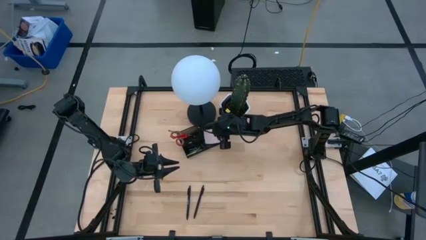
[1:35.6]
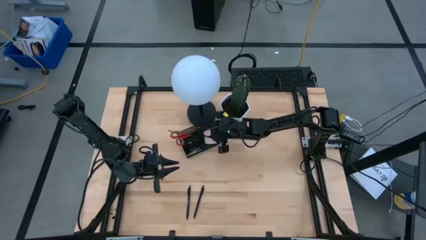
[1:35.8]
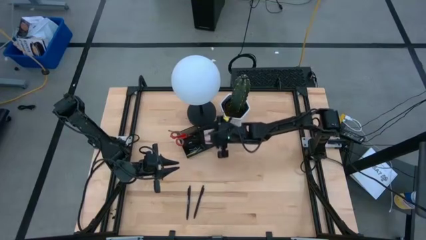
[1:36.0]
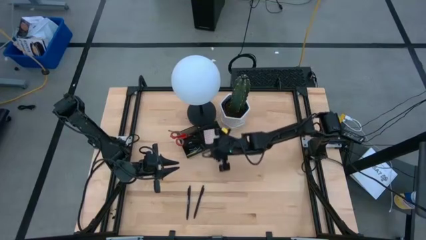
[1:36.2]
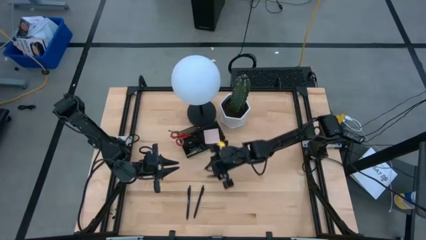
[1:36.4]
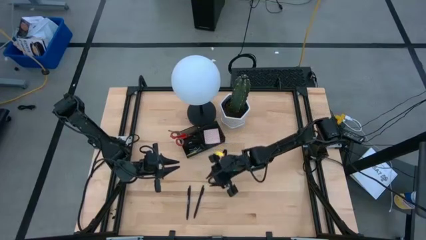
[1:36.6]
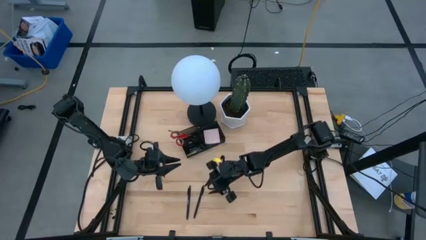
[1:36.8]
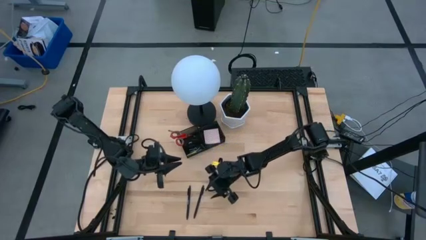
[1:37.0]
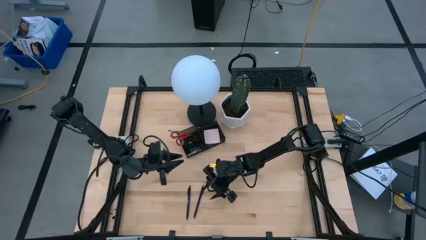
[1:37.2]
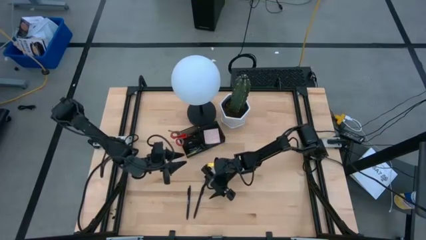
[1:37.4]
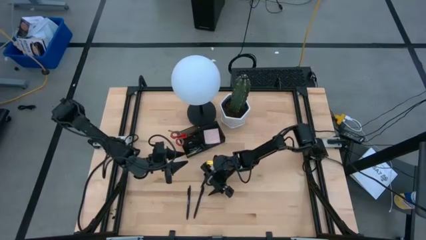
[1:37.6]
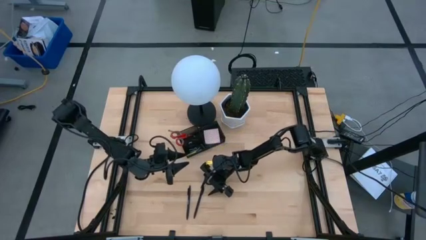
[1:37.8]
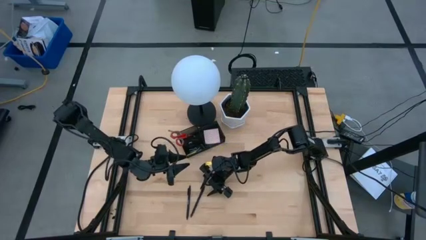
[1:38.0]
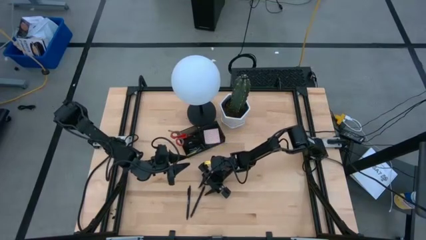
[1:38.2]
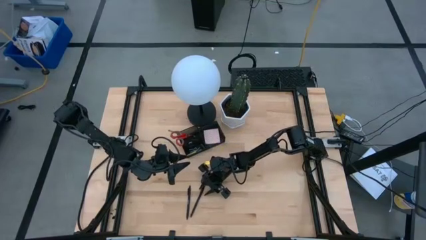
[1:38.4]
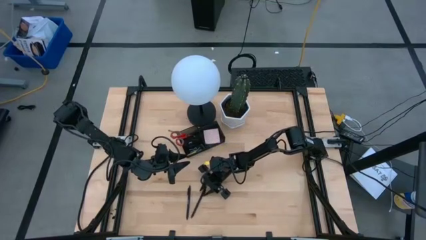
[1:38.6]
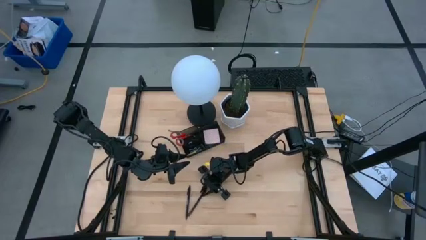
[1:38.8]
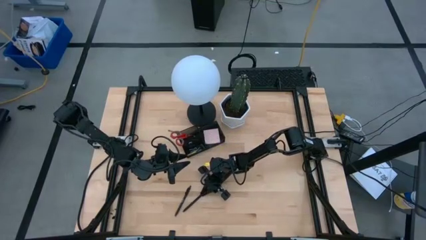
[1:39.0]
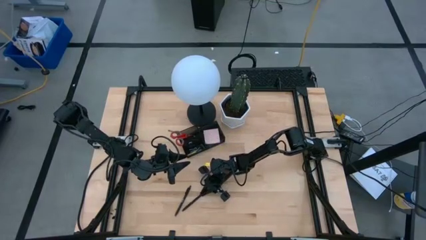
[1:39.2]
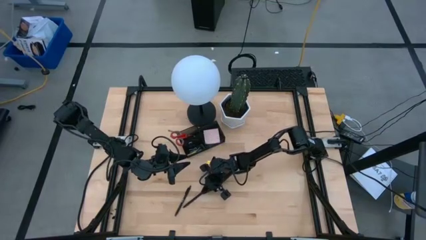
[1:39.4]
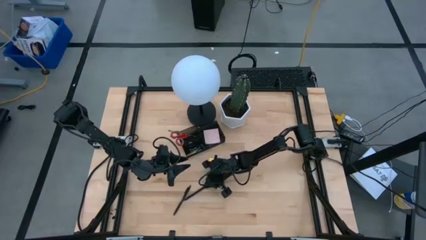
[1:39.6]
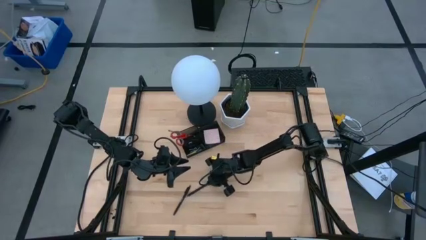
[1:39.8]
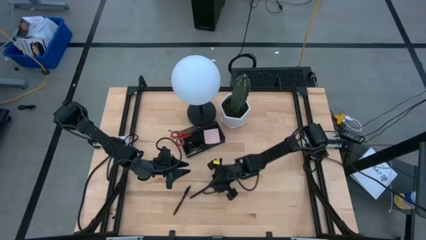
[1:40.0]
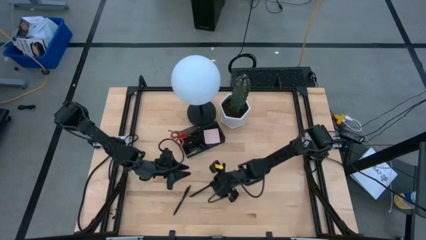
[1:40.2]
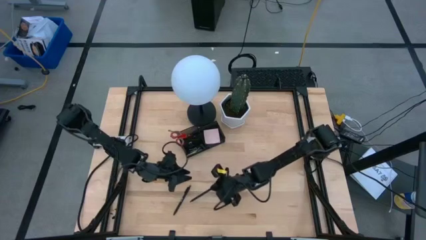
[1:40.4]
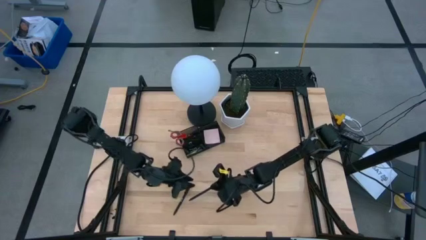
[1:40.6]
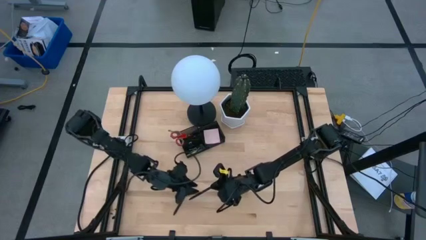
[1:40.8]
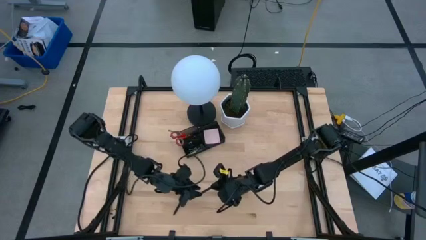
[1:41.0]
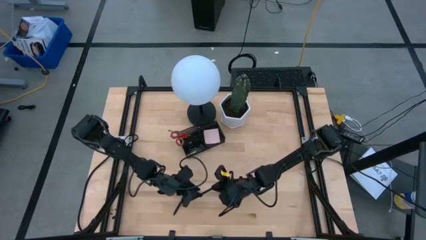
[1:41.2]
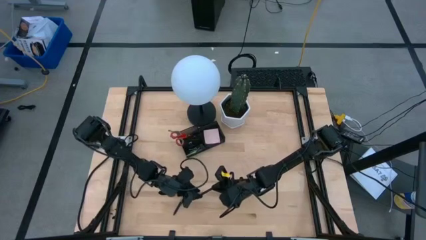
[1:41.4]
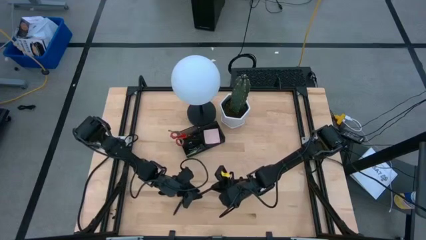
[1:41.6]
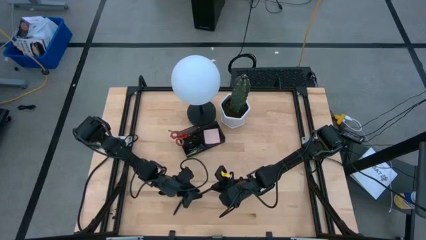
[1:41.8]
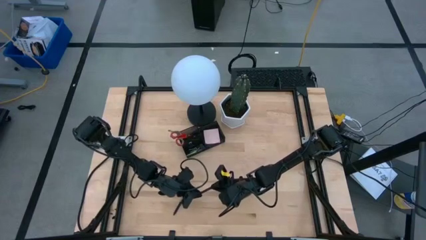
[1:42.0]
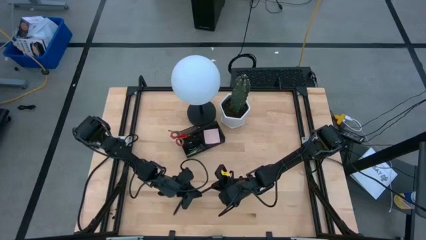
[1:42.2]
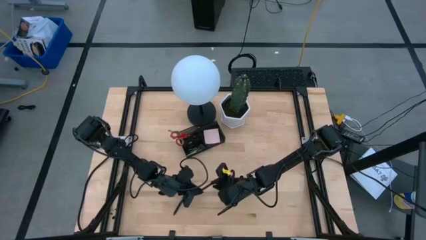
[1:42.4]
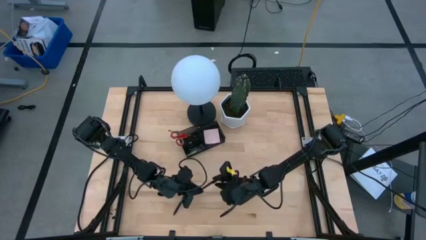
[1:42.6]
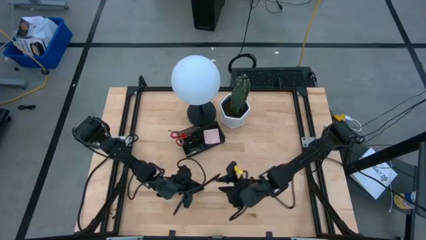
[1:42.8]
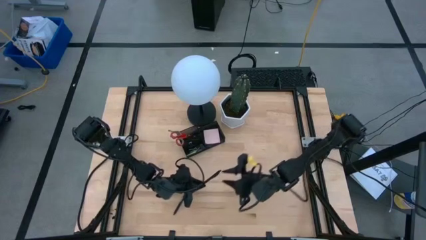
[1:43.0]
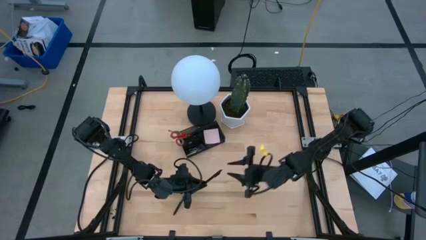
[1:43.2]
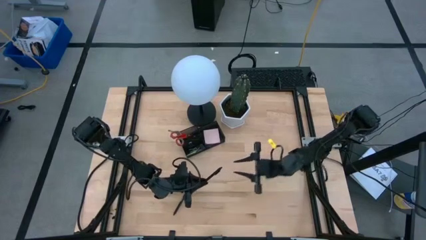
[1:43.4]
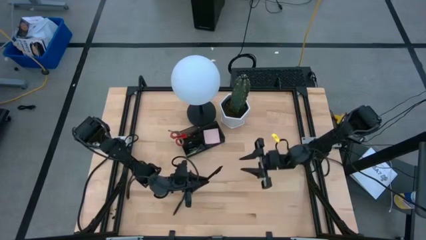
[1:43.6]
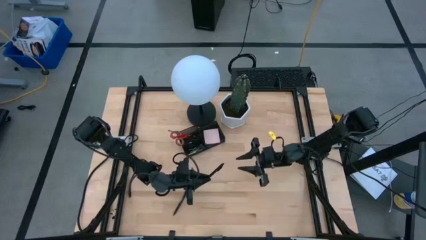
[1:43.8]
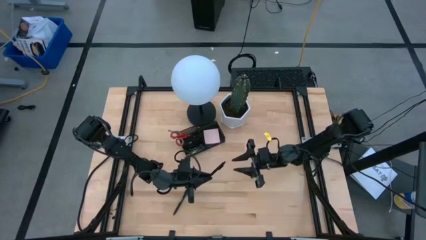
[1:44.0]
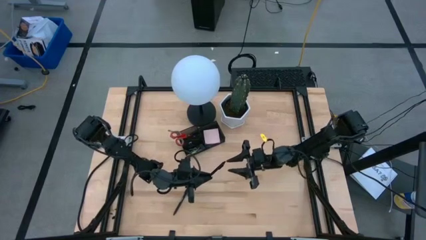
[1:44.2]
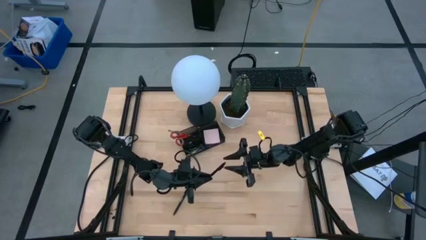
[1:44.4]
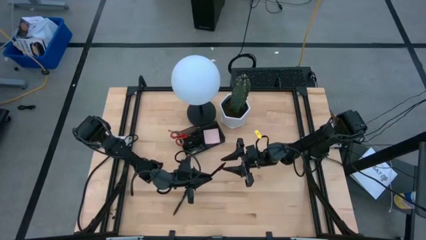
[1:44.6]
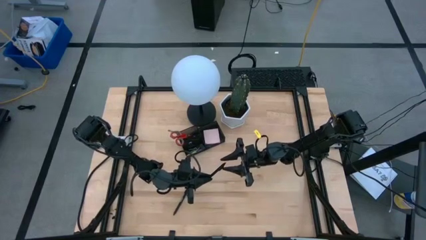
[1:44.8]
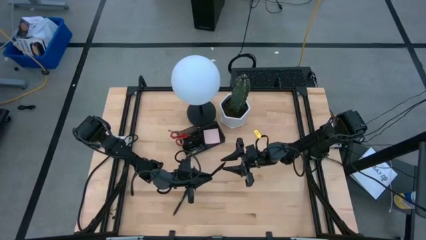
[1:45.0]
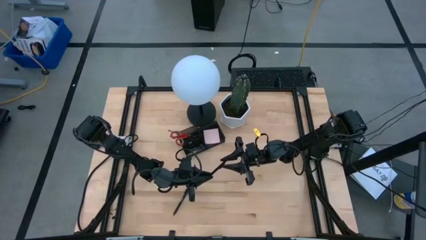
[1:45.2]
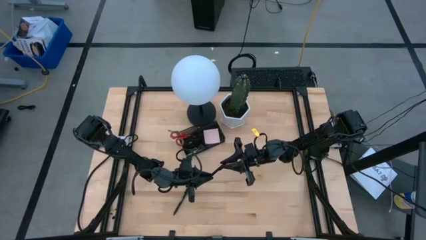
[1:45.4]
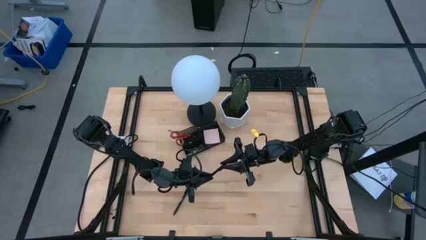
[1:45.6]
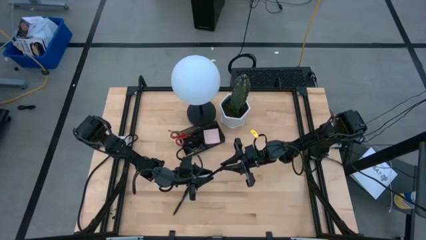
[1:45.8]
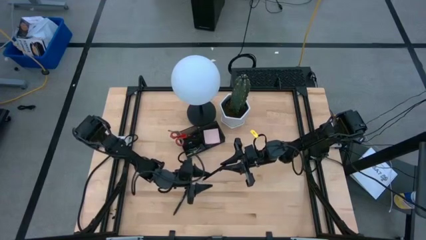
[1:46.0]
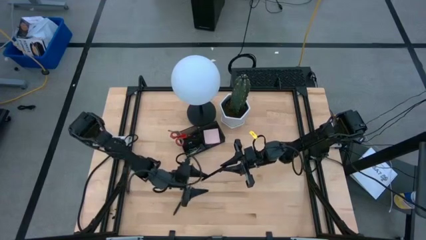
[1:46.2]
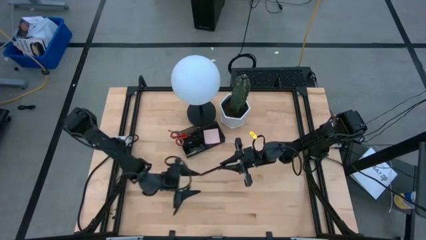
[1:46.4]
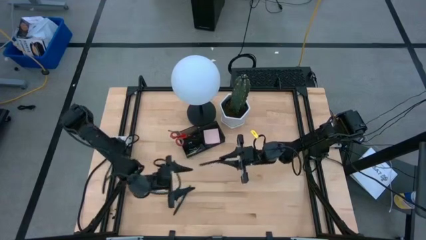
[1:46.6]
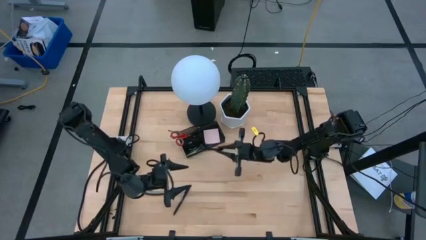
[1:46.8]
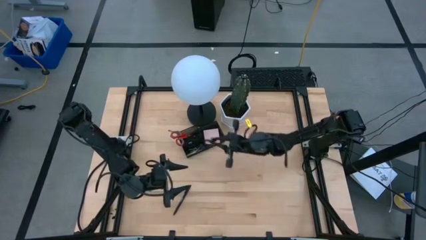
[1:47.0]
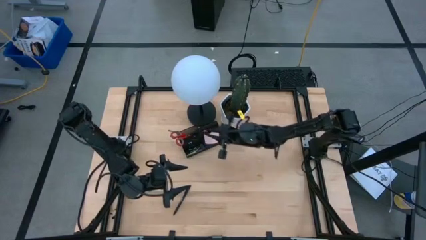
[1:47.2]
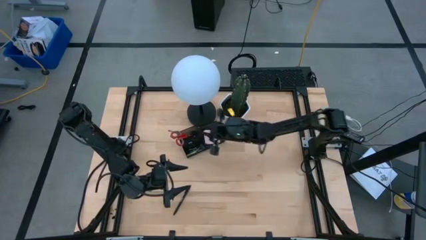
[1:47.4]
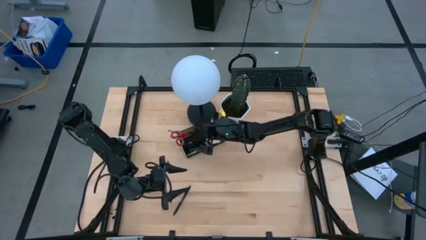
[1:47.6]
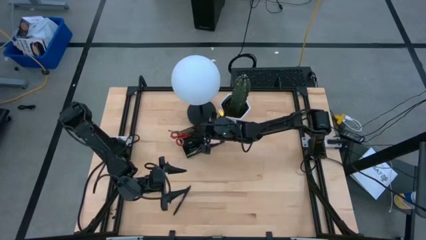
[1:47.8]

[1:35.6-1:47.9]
Task: Pick and place office supplies into organizer
Put the right black pen into the desk organizer

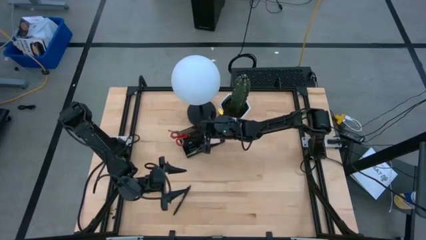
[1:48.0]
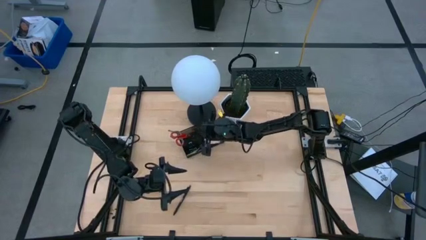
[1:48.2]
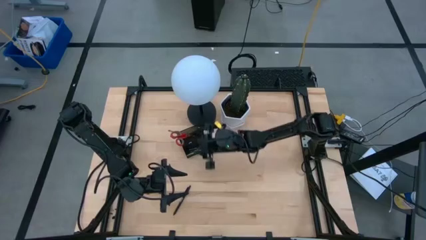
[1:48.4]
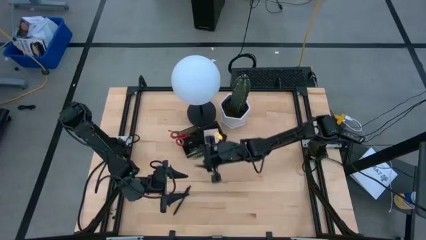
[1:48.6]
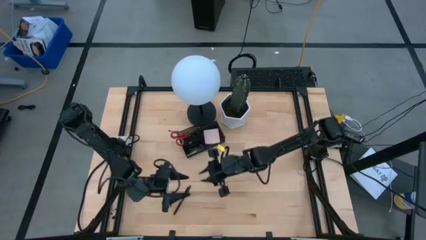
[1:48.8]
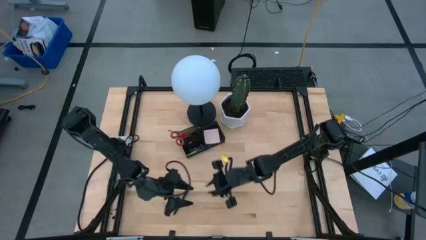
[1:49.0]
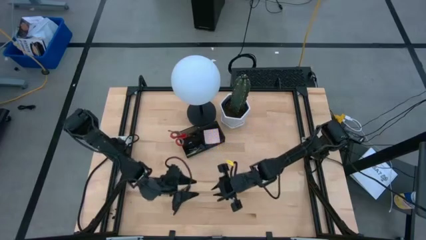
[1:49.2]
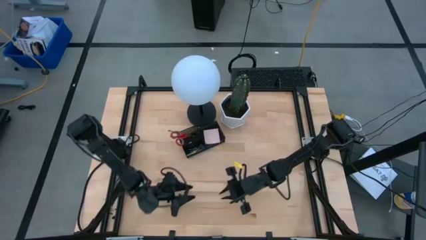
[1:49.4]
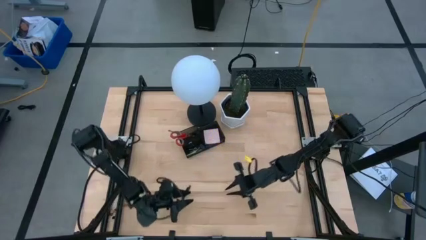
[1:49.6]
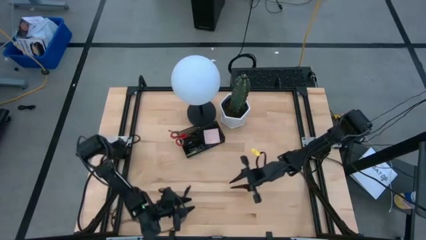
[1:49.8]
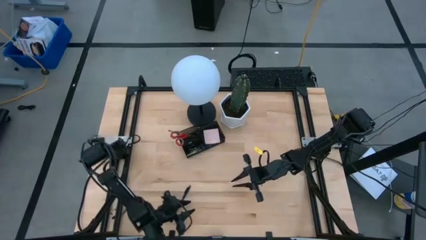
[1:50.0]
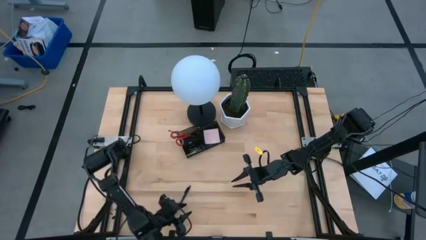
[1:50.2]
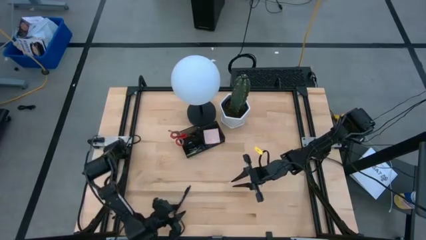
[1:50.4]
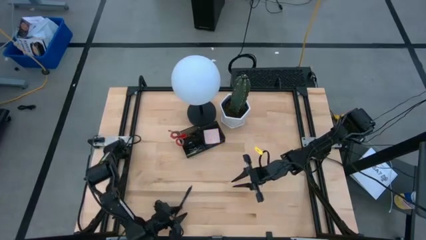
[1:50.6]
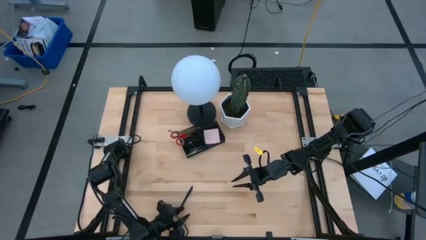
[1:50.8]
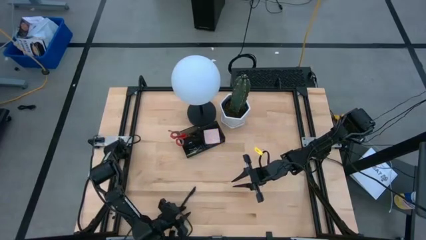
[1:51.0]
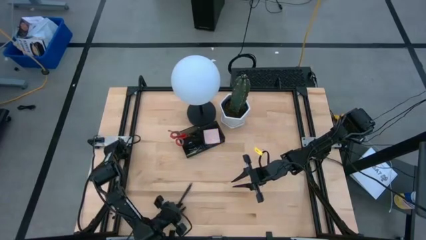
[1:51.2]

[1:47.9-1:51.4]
Put the black pen into the desk organizer
